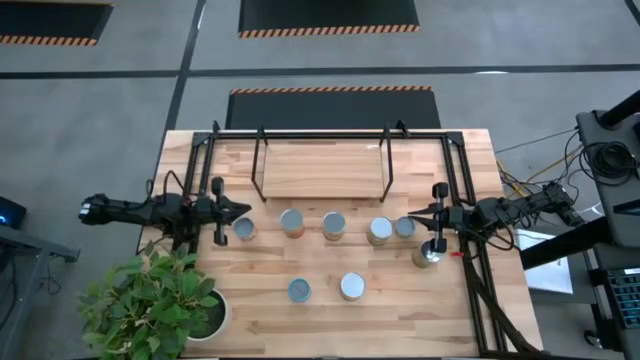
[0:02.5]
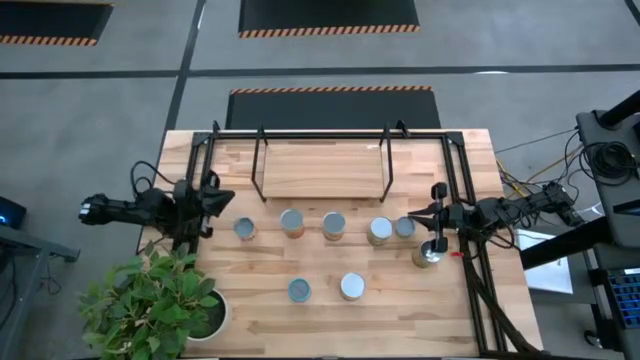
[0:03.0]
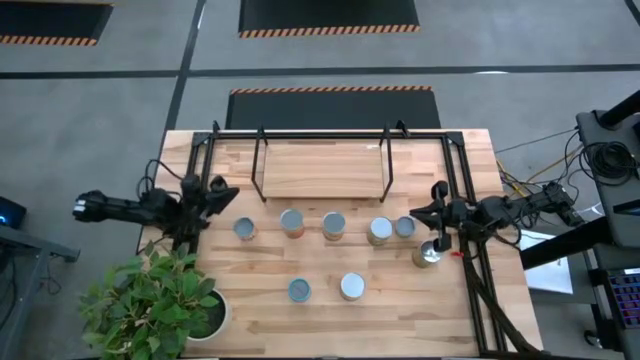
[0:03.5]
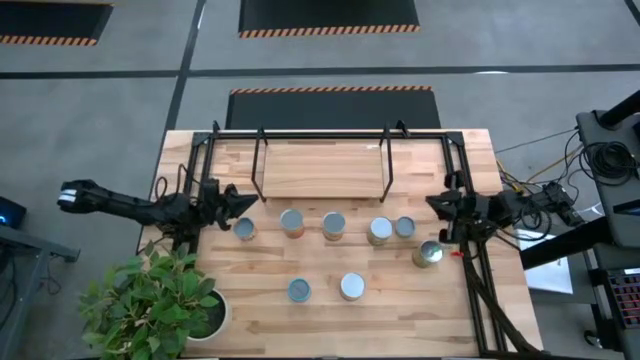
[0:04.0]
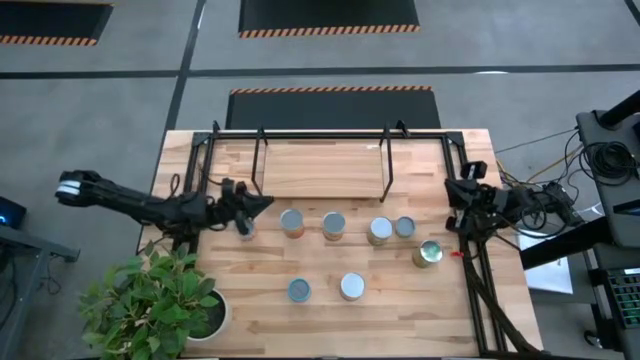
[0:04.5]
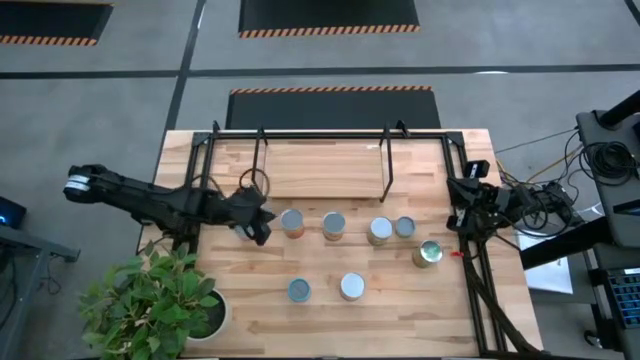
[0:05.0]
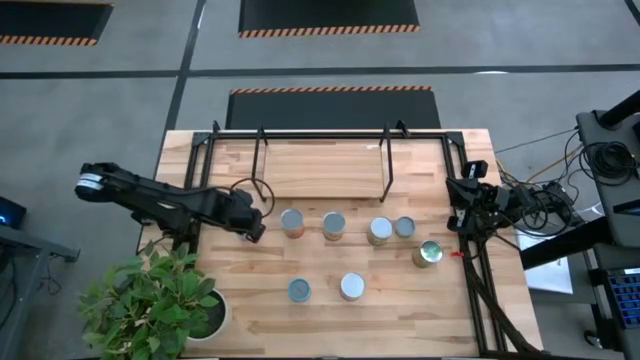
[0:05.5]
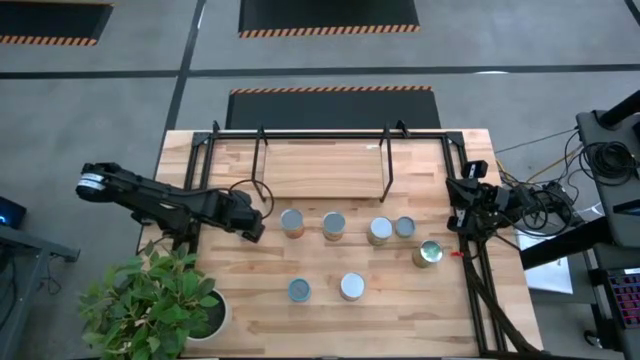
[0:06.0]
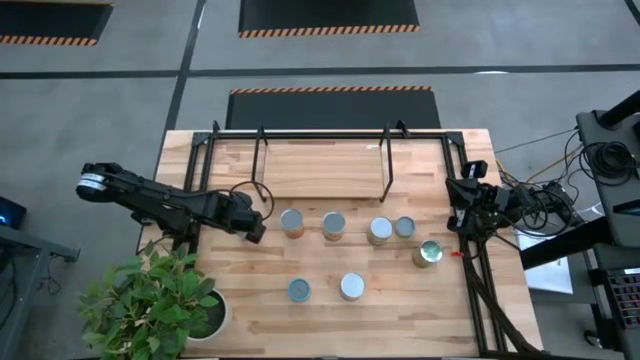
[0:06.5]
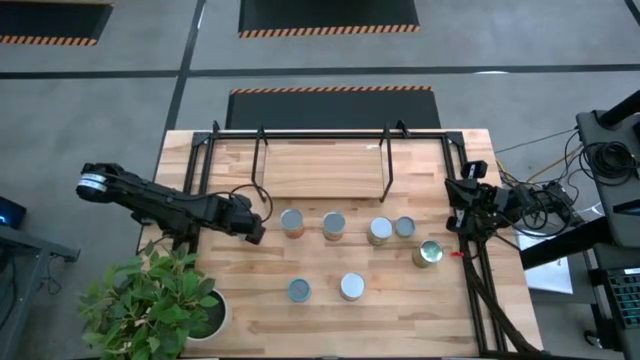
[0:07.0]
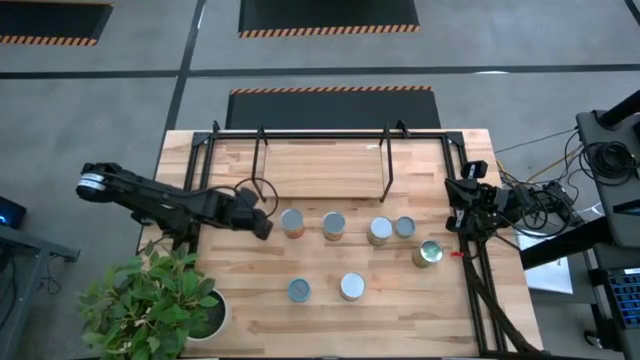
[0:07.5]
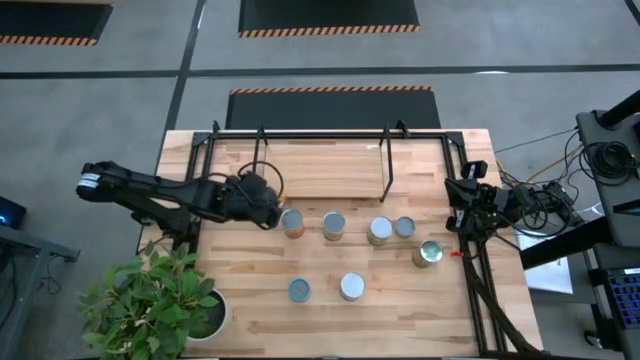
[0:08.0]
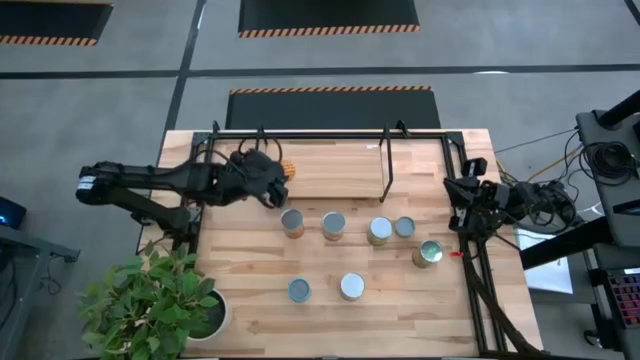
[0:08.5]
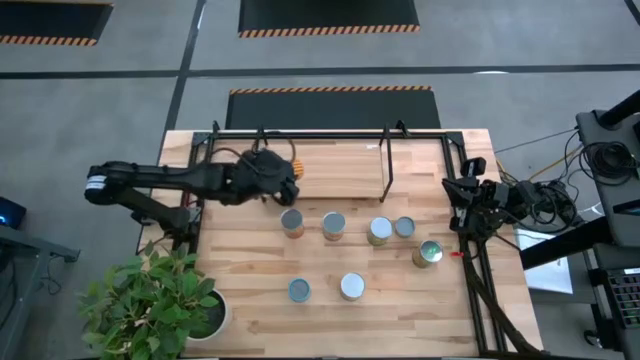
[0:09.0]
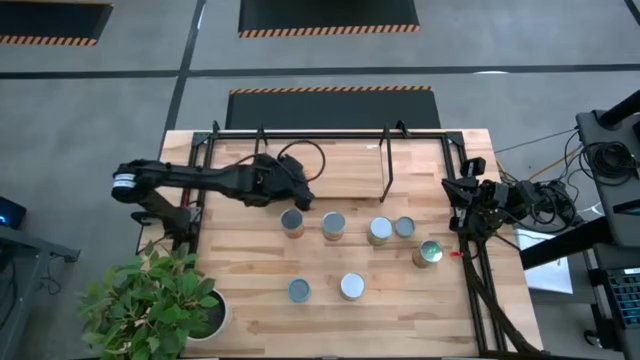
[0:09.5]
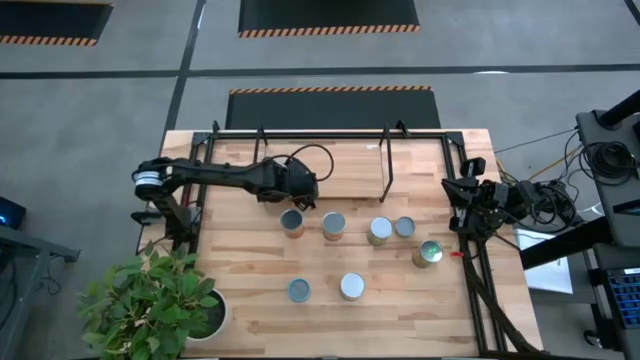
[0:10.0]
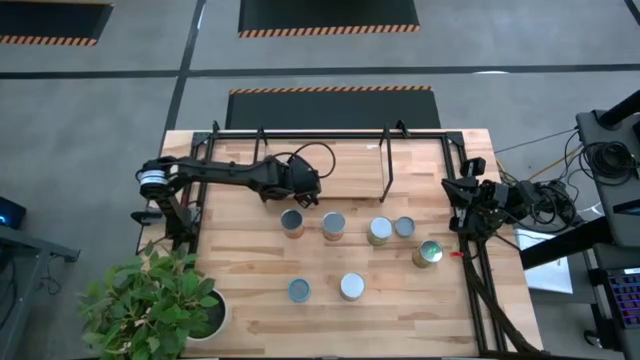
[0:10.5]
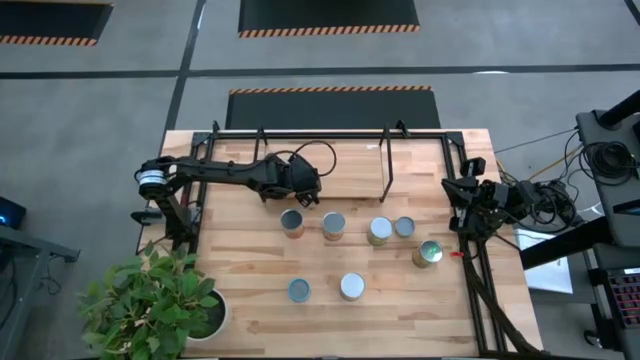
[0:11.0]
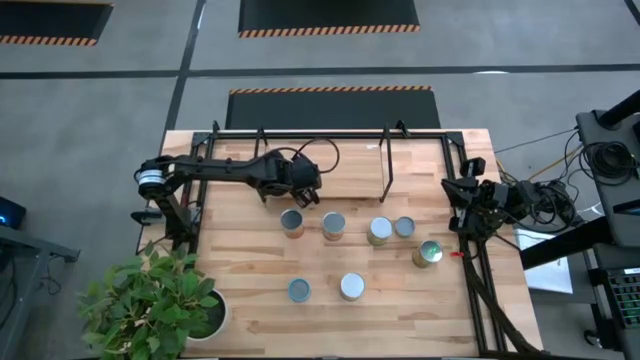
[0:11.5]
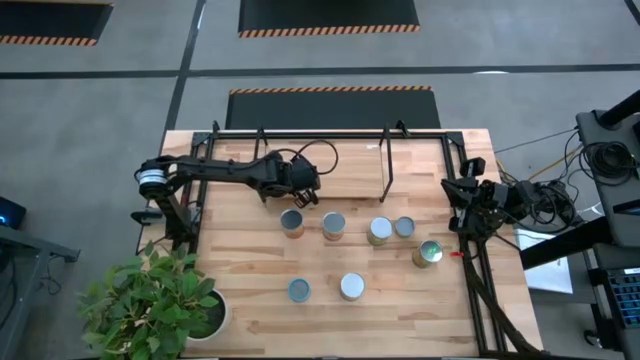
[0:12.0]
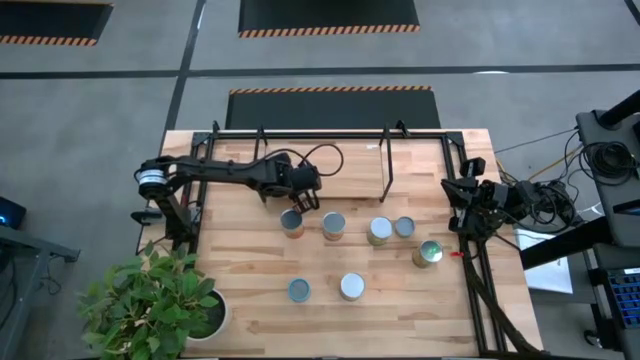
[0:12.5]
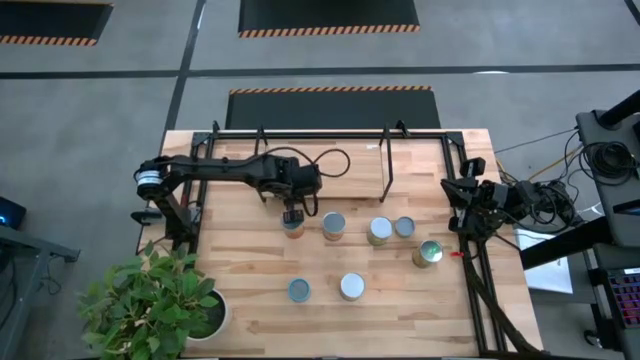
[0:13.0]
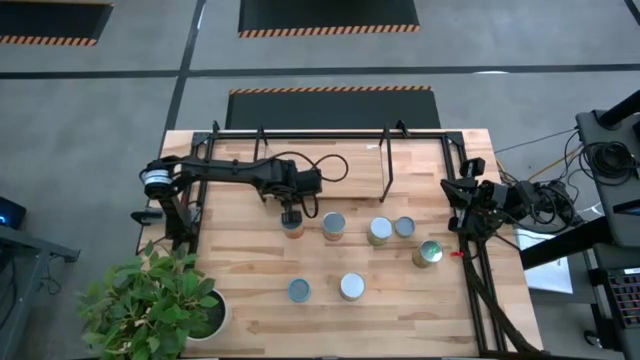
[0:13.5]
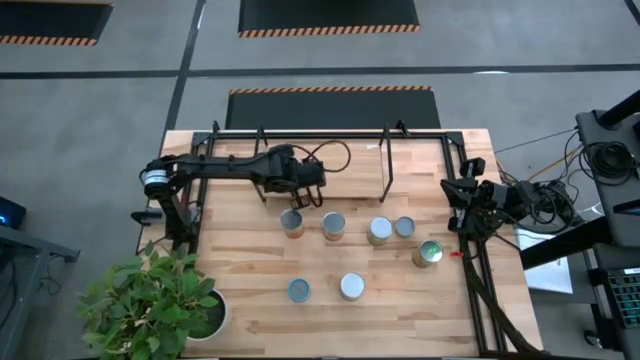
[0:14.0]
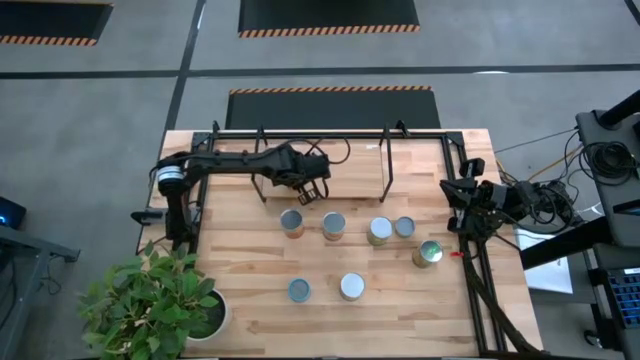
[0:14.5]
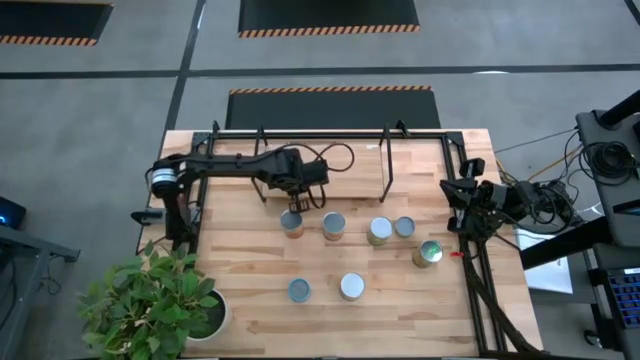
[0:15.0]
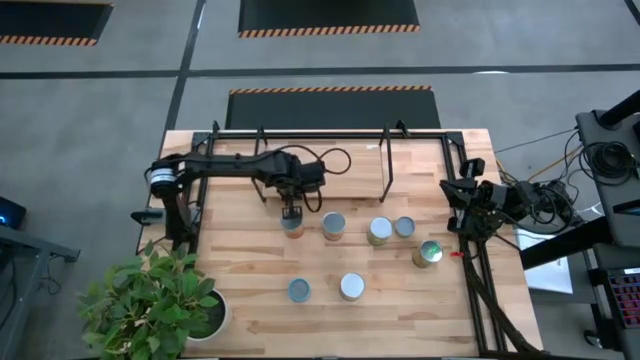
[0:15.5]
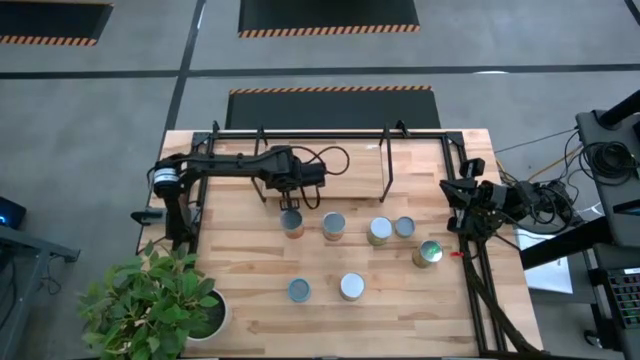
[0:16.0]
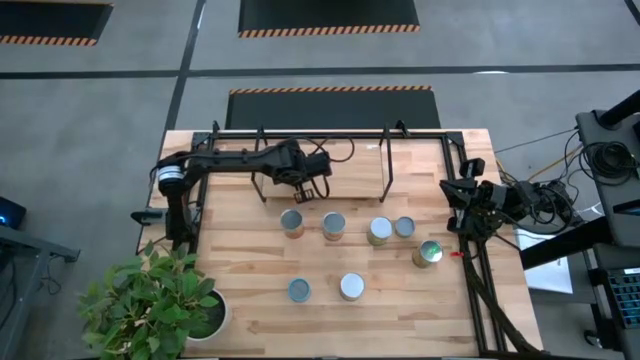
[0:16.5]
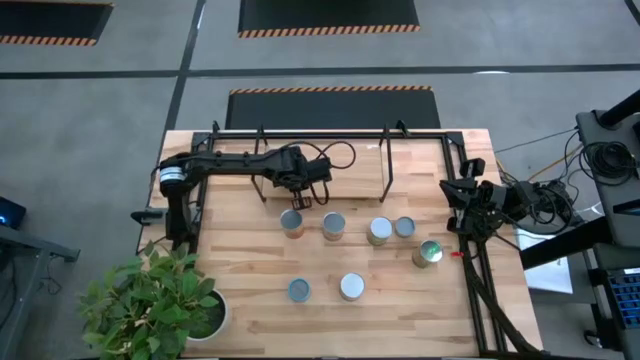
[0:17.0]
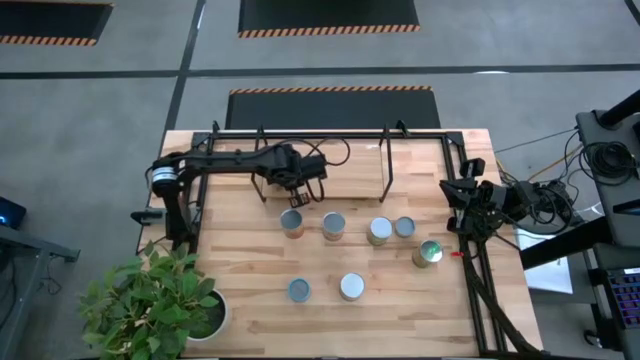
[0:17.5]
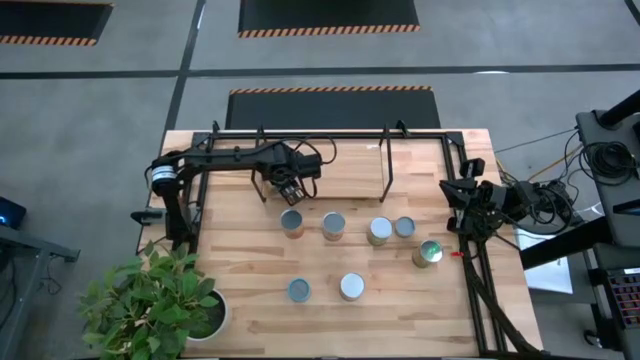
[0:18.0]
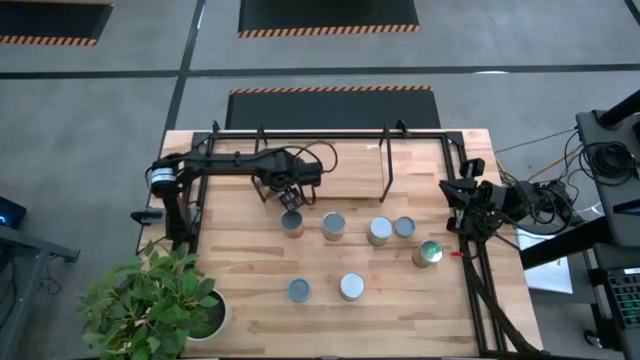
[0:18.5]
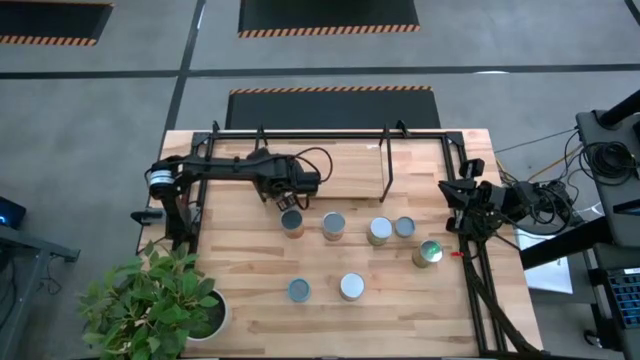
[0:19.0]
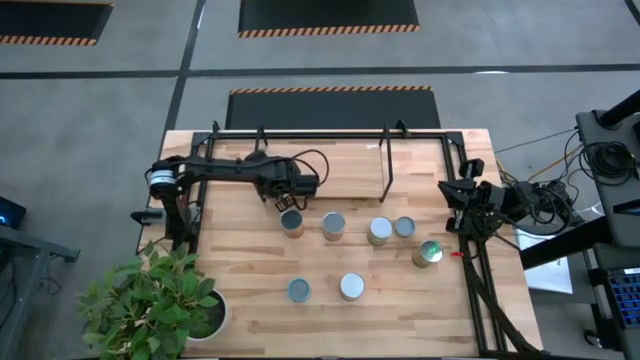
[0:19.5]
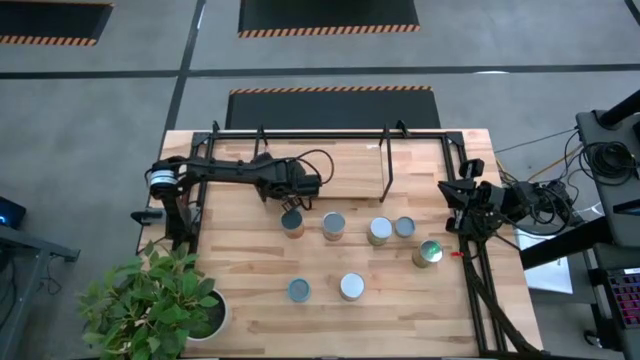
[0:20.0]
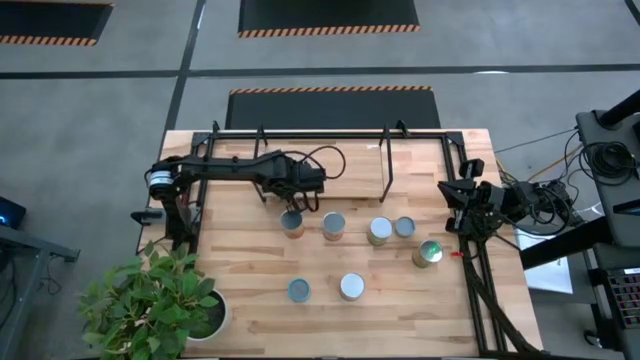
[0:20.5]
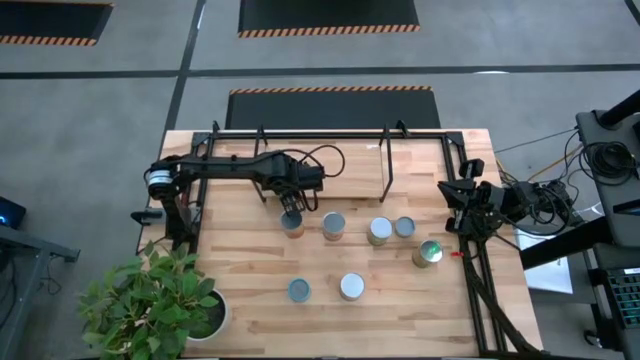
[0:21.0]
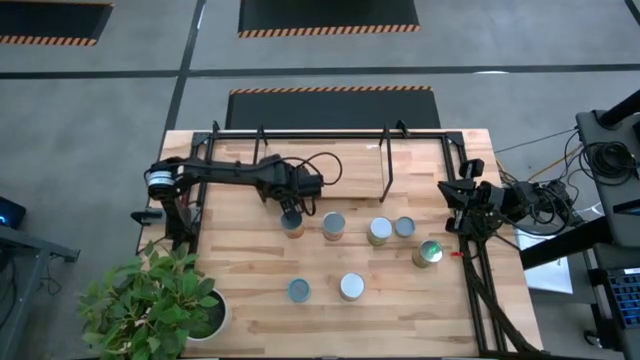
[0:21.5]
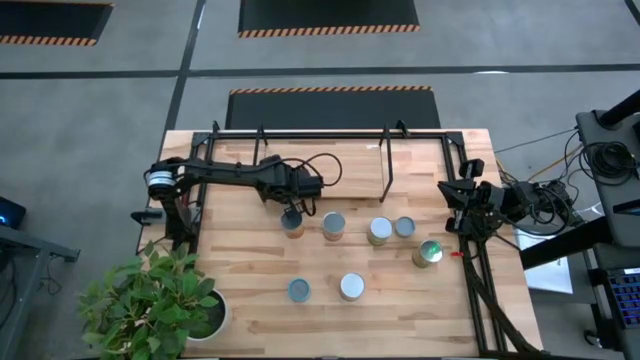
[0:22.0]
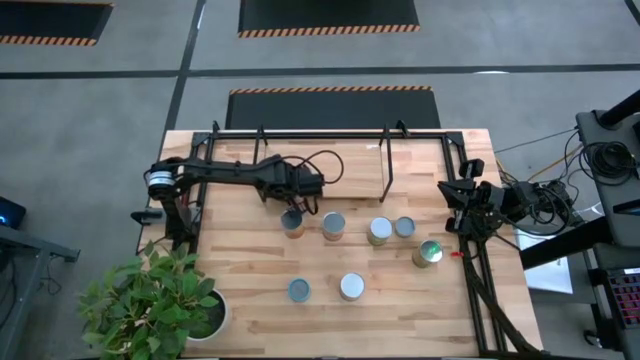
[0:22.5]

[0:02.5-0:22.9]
Task: Pick and place cans onto a shelf
Put the small yellow canned bean on the shelf

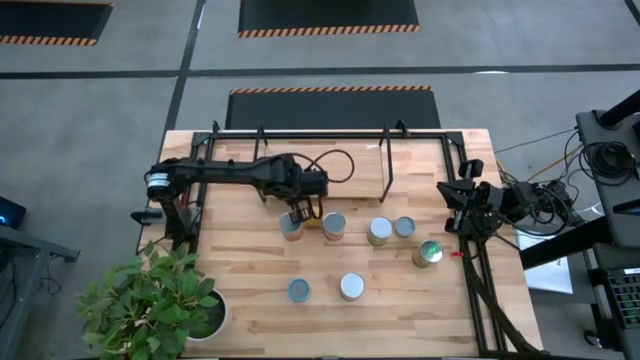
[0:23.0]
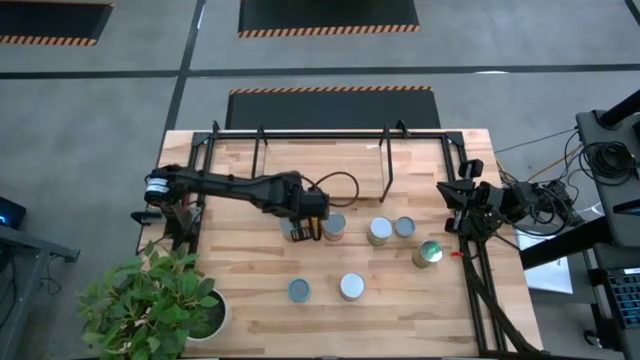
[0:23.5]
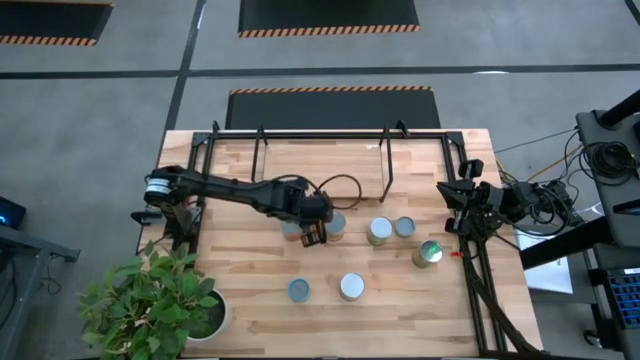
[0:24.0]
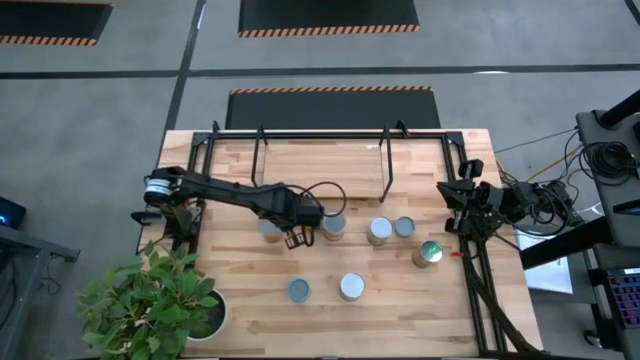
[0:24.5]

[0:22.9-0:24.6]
Adjust the big orange canned bean

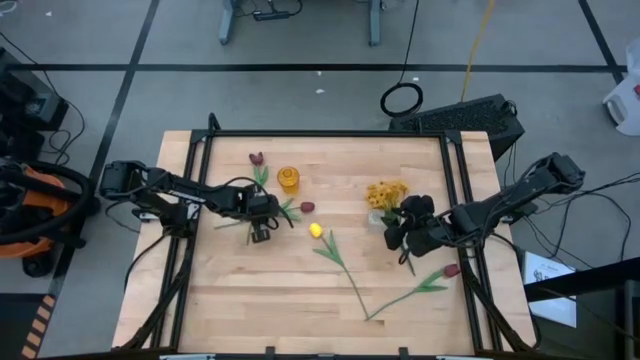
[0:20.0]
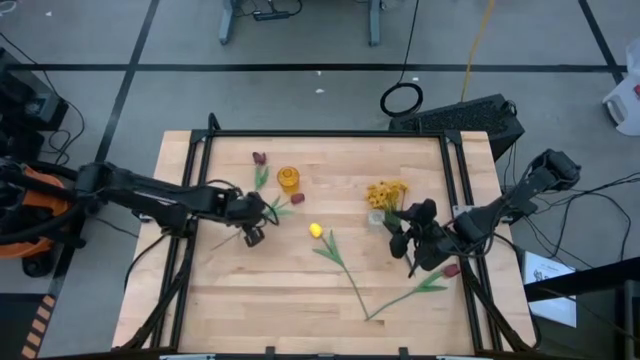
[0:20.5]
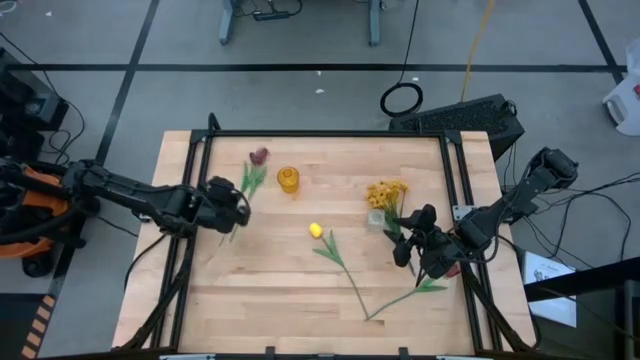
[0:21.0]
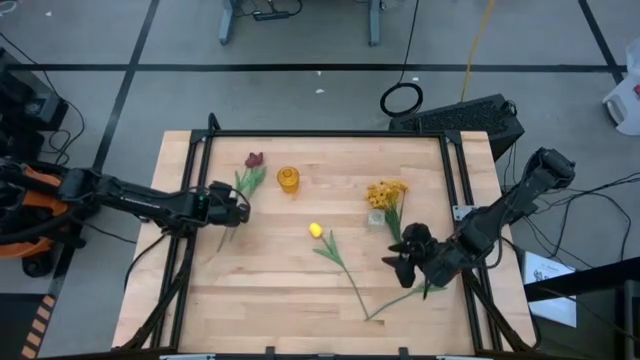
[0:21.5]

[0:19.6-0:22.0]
Task: Sort flowers into vase by color
Move the red flower on top of the other red flower
